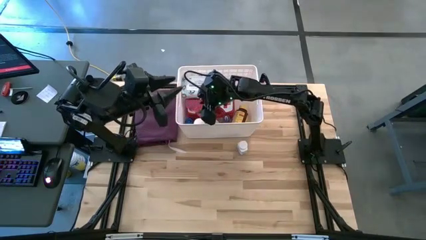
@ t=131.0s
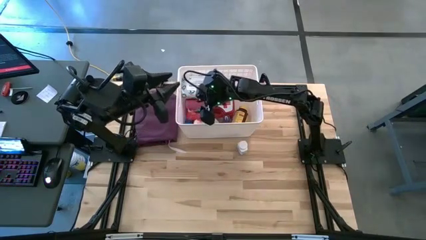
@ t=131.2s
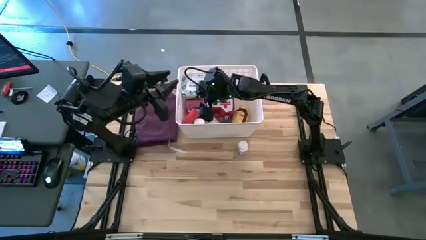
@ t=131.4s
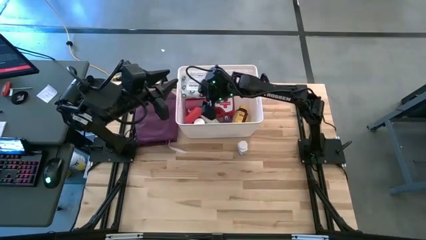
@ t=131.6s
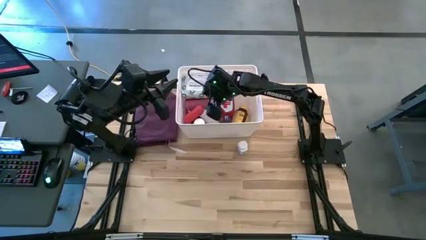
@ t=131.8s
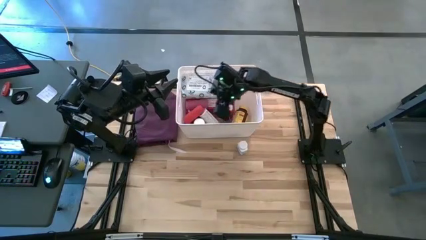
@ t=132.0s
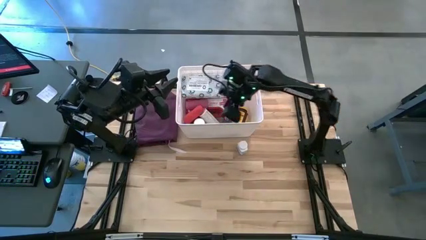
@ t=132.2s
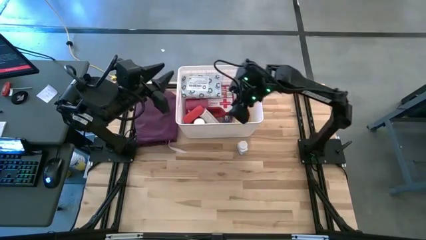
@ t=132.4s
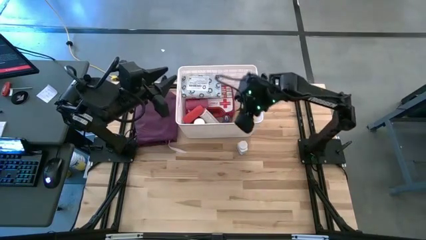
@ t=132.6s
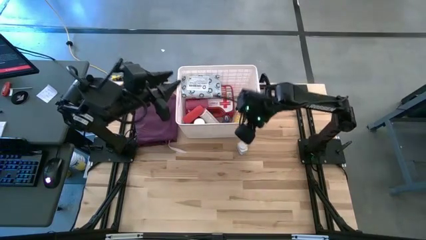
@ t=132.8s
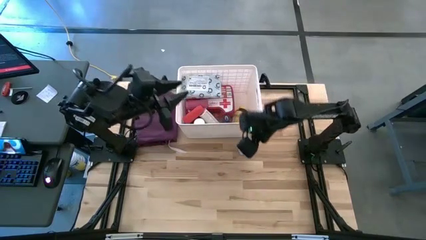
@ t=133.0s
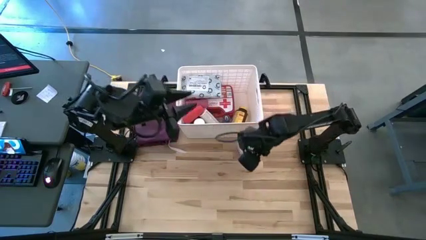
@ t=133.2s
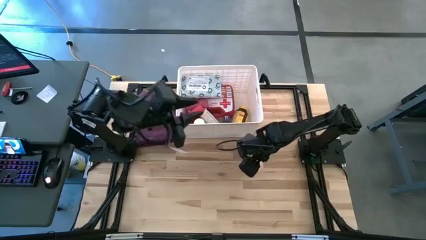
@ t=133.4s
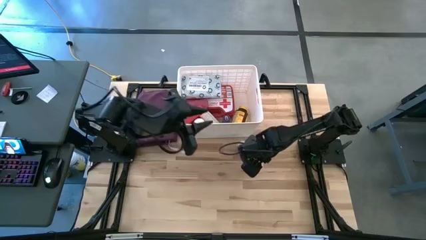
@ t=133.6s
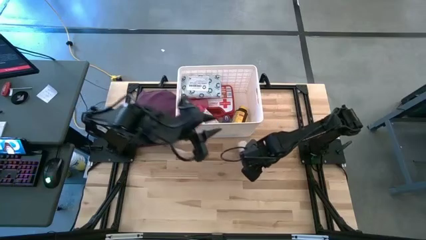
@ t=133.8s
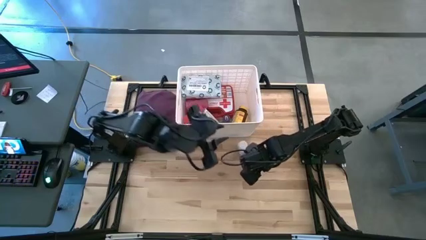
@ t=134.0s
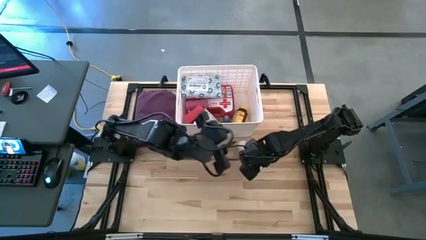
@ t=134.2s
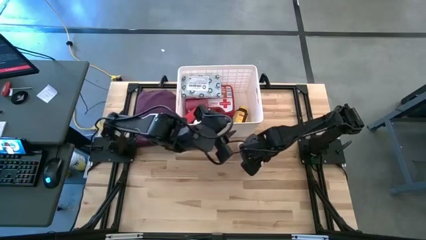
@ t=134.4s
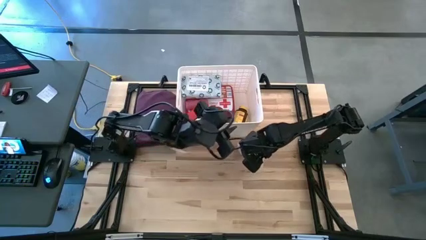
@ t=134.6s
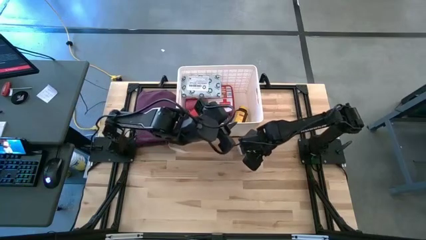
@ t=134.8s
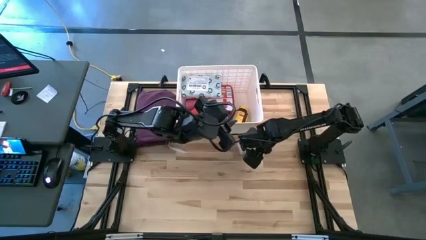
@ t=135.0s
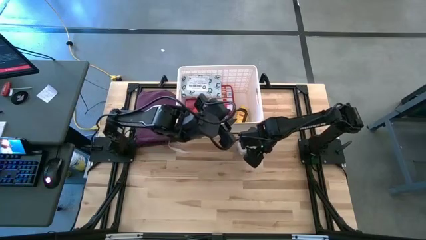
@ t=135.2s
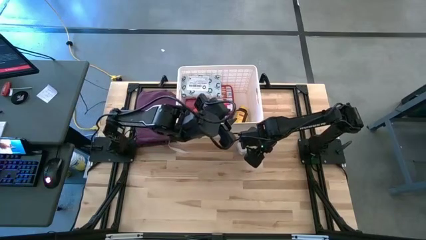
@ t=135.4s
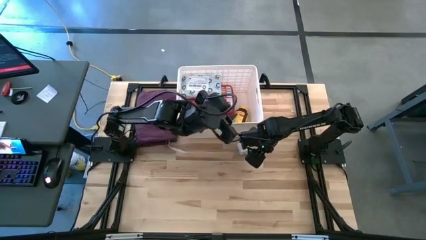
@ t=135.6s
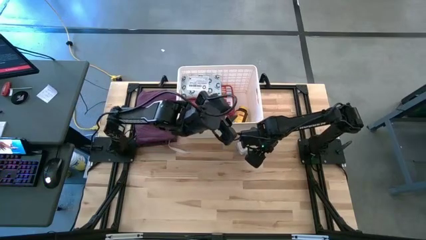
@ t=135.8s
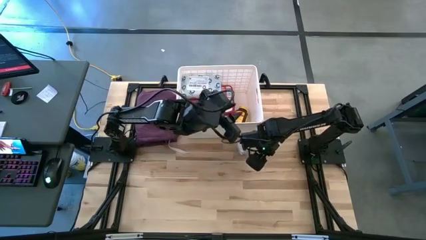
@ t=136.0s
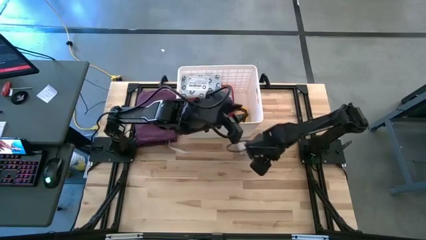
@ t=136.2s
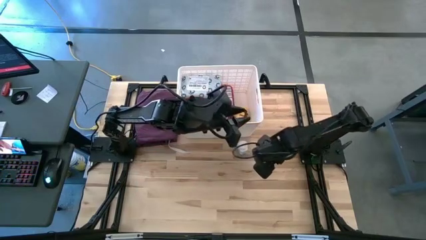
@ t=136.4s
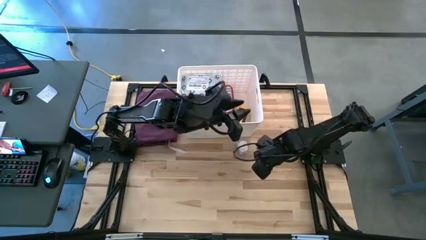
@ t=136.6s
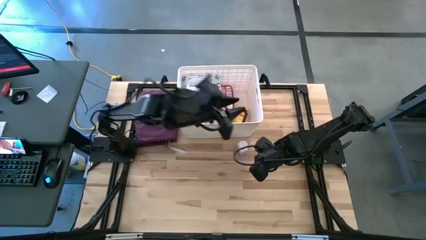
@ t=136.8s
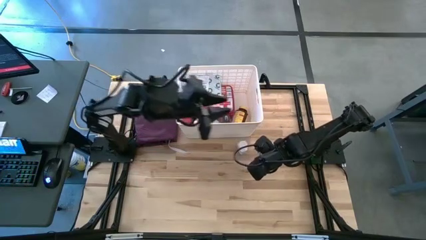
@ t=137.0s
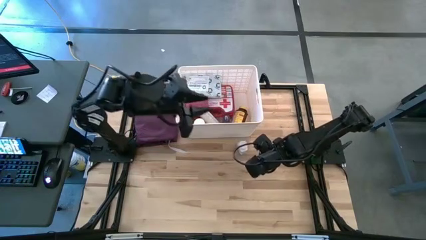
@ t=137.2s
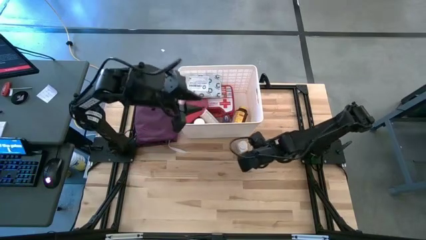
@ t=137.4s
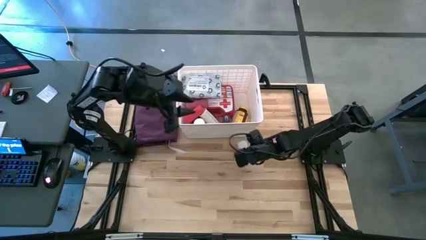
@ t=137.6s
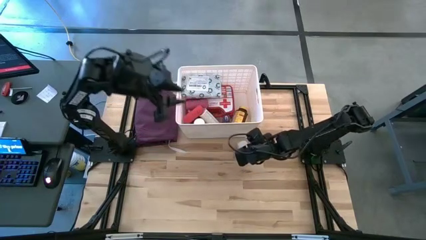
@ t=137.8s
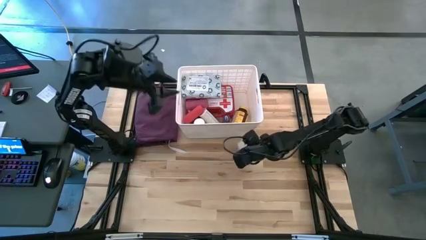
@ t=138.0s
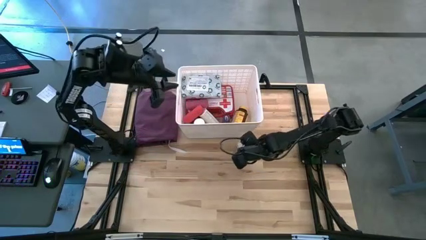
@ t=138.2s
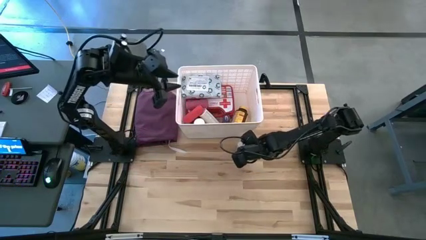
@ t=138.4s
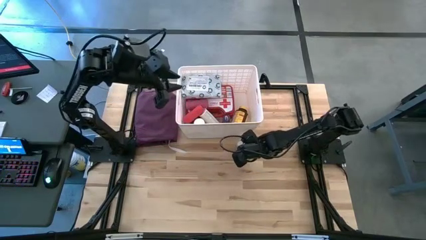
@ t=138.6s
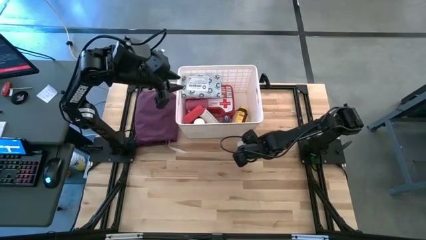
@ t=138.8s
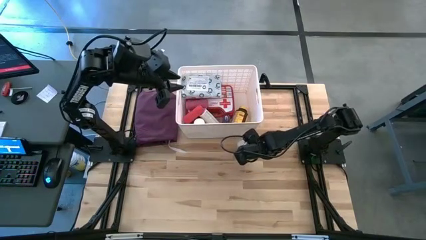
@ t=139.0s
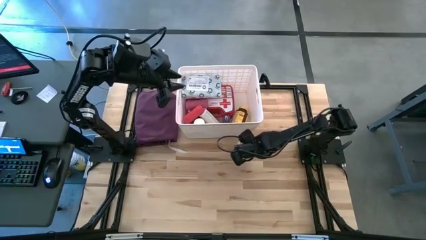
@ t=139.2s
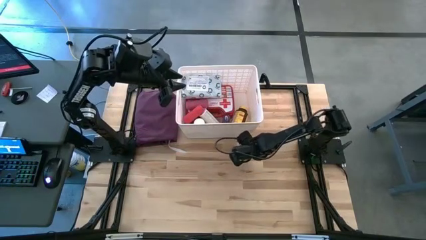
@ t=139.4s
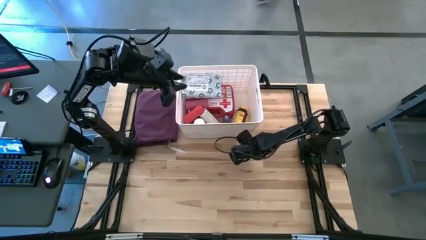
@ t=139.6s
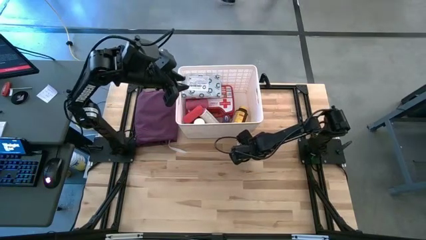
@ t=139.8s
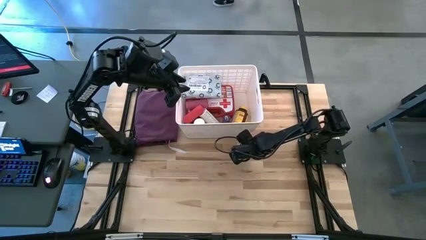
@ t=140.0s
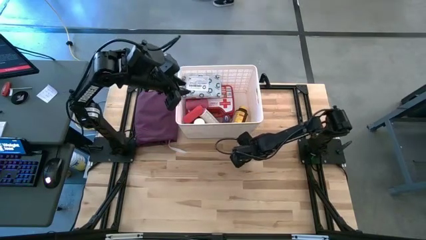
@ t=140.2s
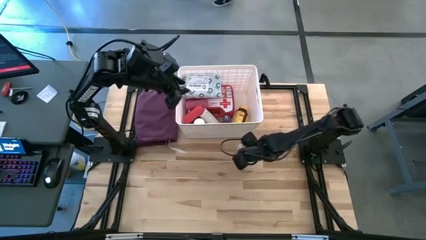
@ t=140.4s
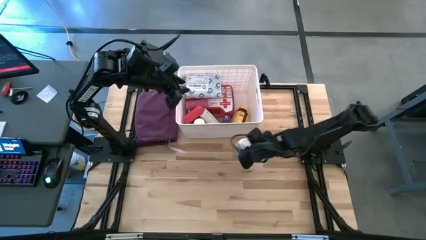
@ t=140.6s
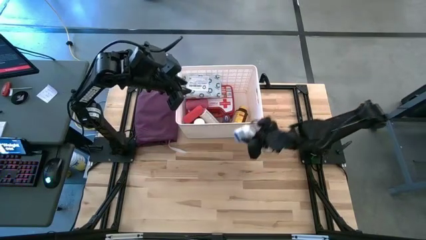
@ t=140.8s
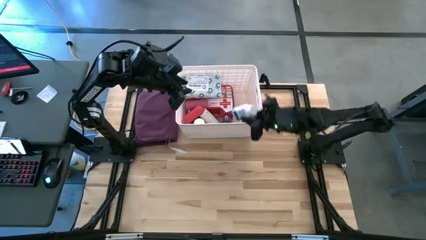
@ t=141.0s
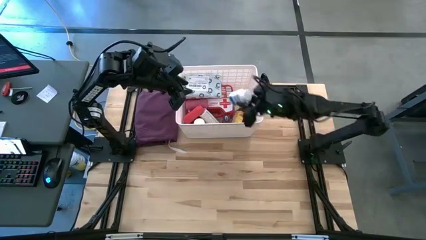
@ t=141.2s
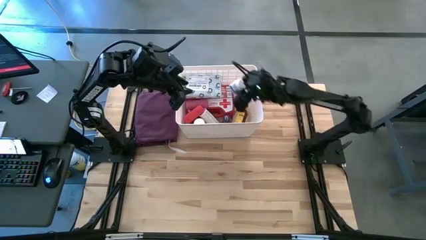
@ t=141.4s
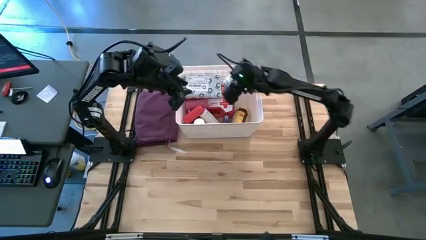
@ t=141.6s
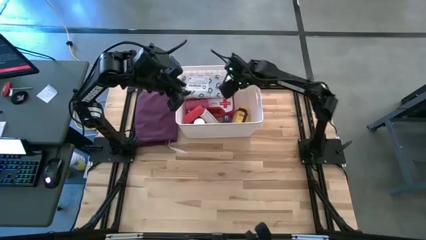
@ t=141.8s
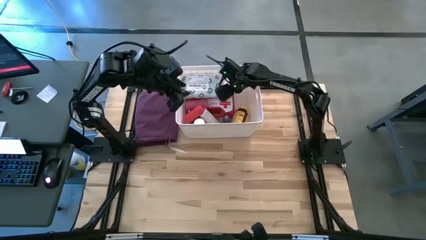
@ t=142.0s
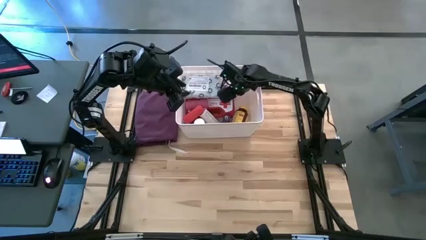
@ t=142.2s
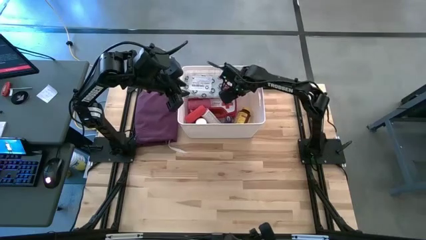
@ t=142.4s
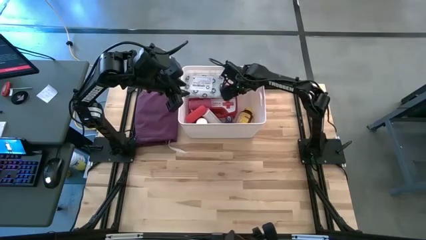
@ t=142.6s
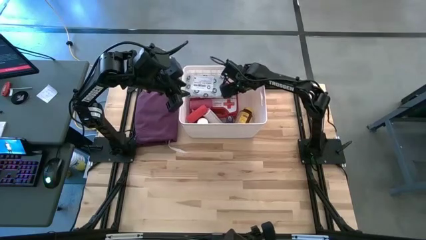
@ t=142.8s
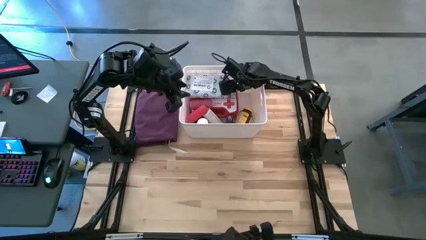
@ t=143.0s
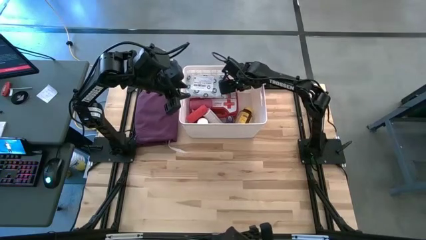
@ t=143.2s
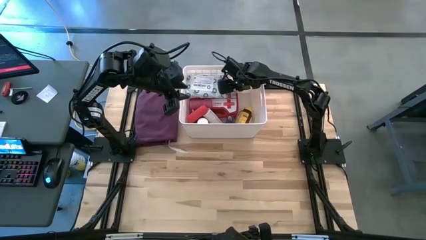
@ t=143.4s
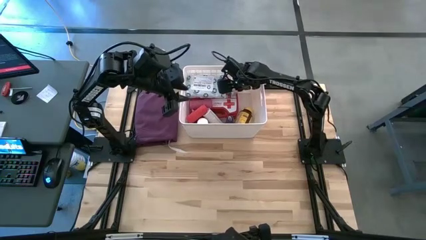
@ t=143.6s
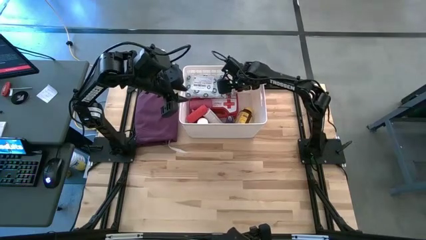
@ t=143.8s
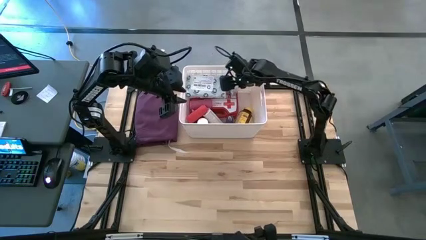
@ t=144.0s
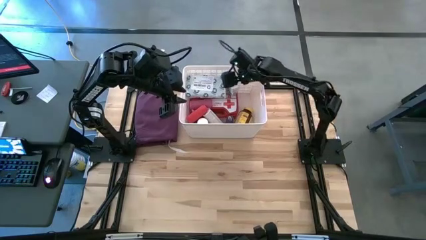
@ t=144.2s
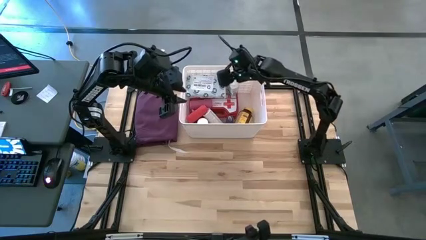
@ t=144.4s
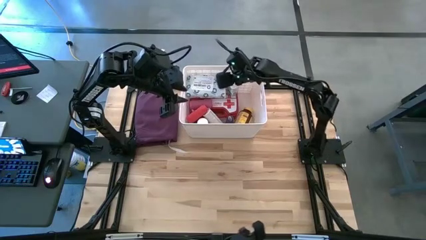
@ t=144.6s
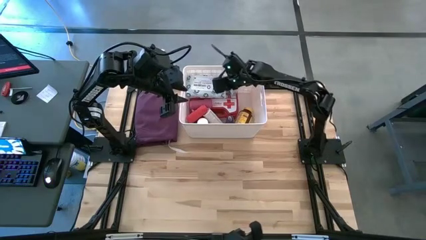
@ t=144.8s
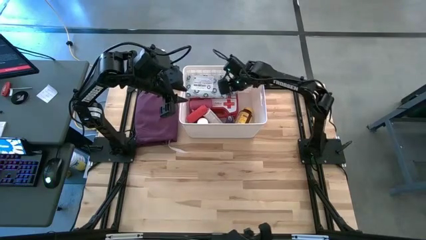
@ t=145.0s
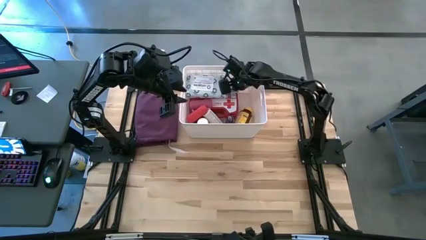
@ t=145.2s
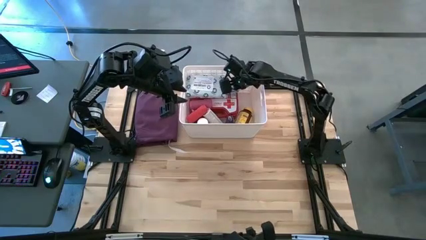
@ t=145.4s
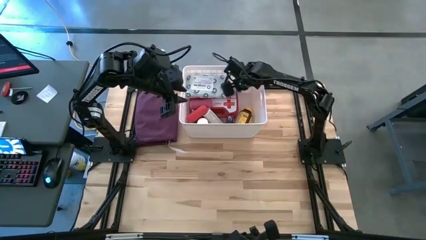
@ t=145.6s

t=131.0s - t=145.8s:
Task: Pick & place medical supplies in basket/bin
Put the white pill bottle into the white bin
